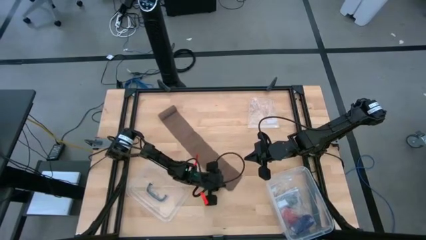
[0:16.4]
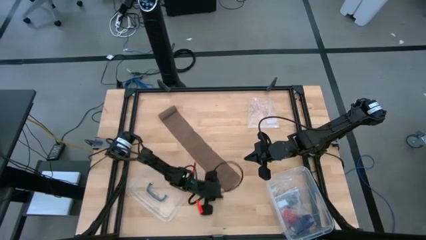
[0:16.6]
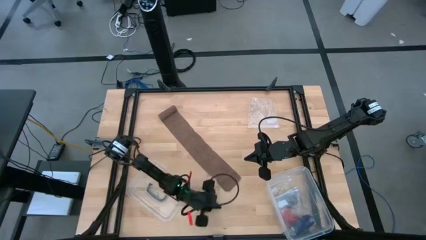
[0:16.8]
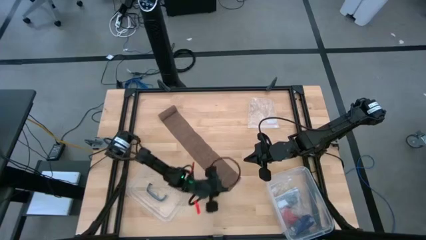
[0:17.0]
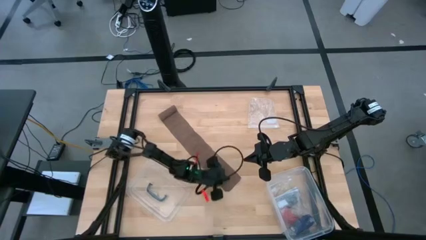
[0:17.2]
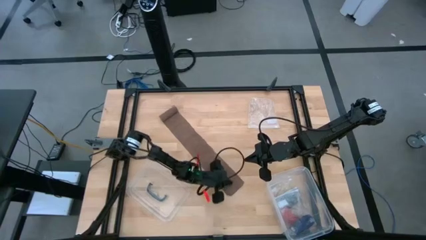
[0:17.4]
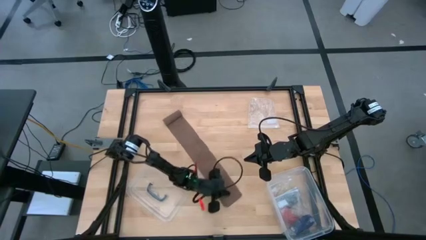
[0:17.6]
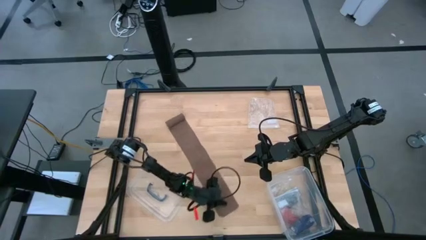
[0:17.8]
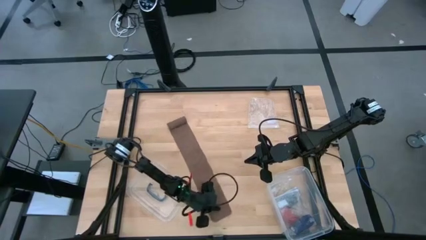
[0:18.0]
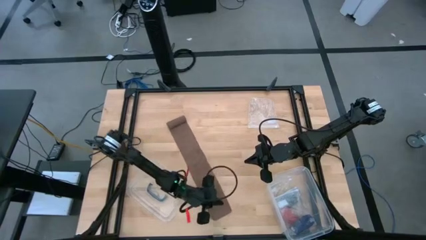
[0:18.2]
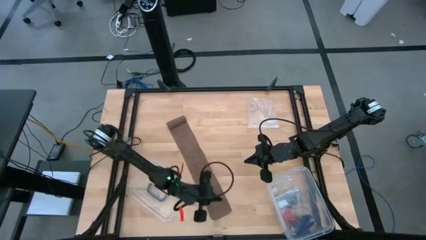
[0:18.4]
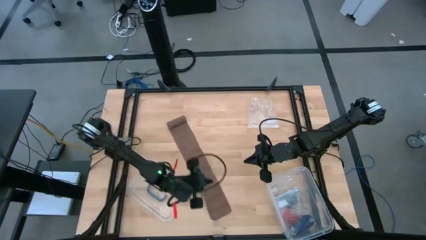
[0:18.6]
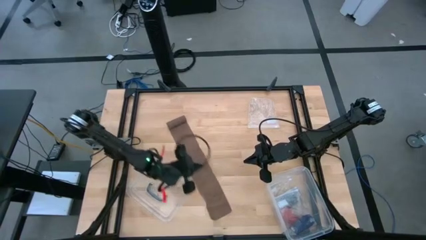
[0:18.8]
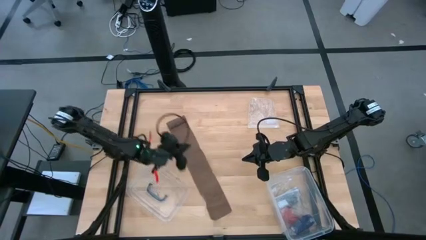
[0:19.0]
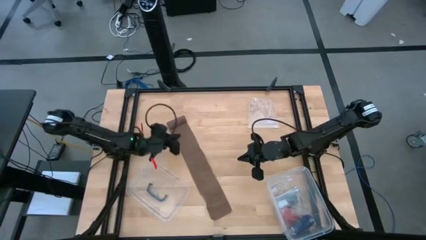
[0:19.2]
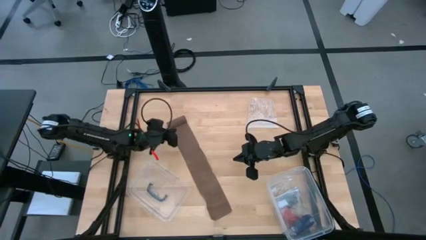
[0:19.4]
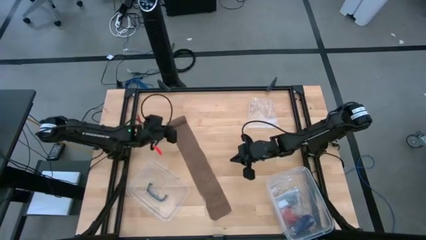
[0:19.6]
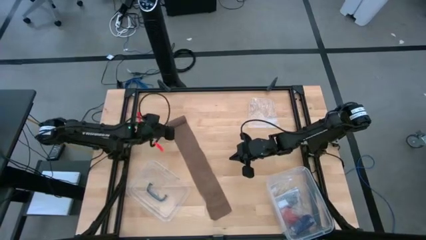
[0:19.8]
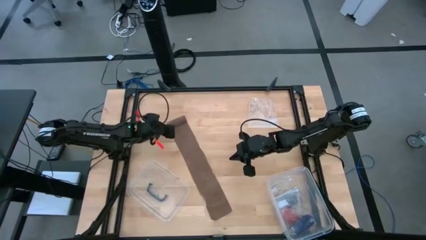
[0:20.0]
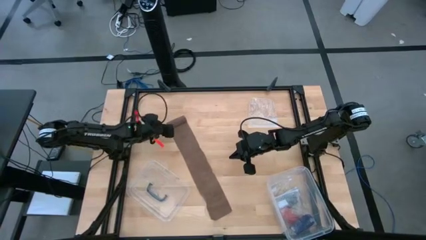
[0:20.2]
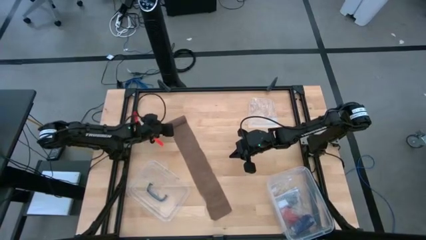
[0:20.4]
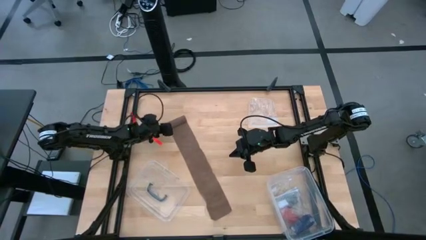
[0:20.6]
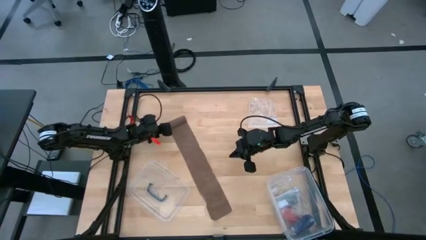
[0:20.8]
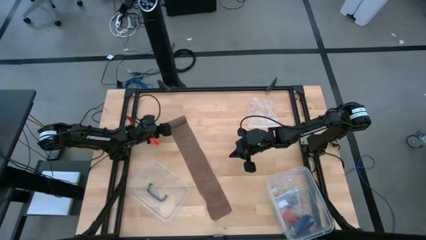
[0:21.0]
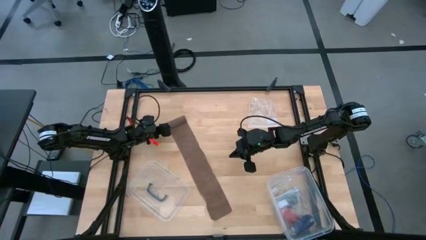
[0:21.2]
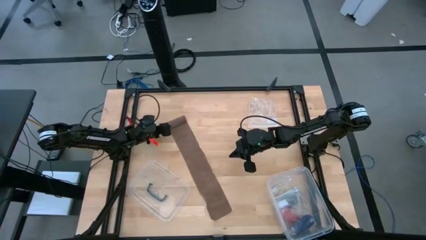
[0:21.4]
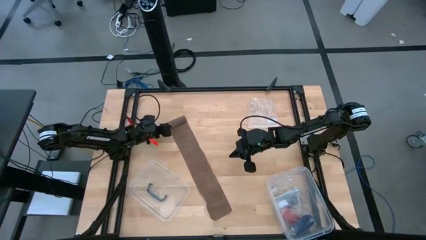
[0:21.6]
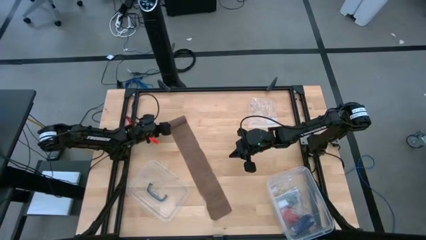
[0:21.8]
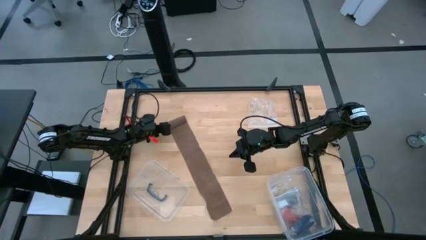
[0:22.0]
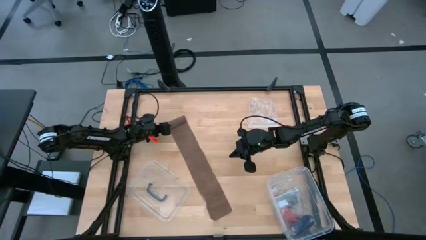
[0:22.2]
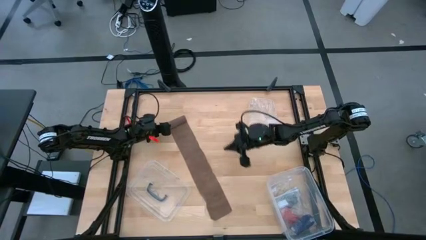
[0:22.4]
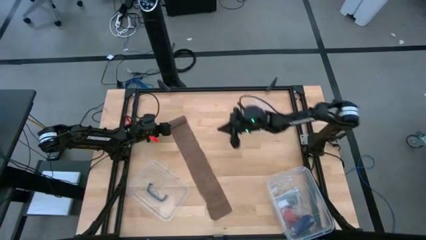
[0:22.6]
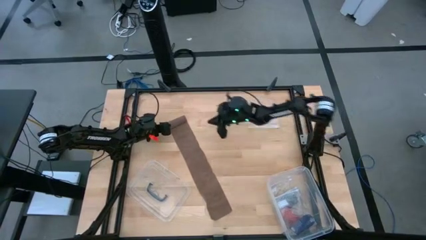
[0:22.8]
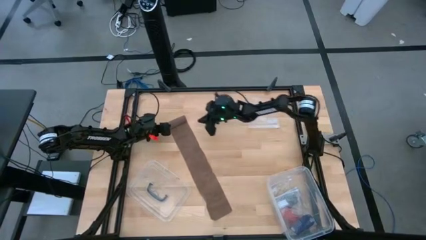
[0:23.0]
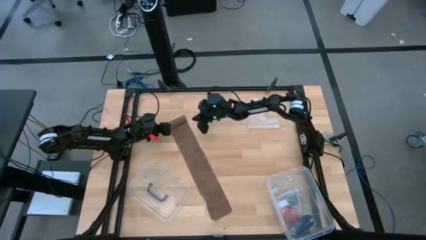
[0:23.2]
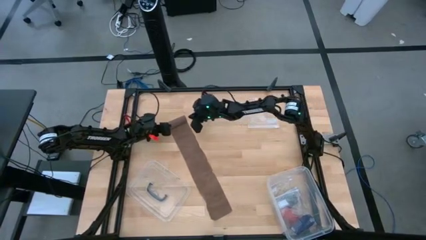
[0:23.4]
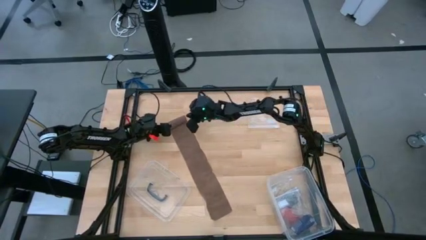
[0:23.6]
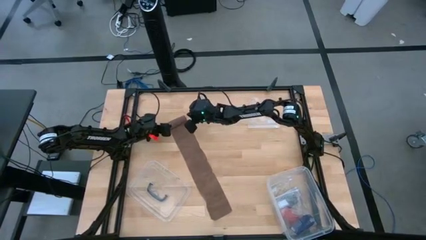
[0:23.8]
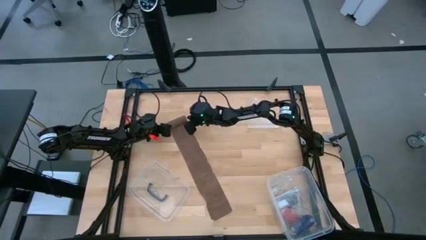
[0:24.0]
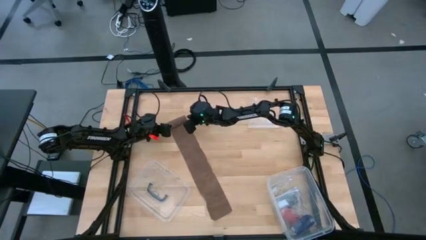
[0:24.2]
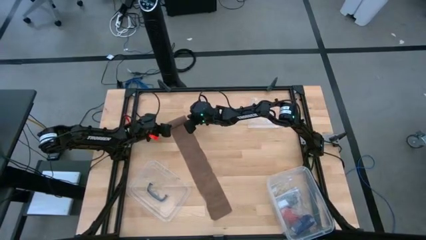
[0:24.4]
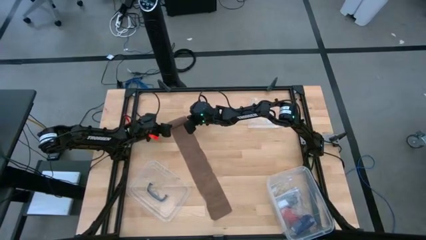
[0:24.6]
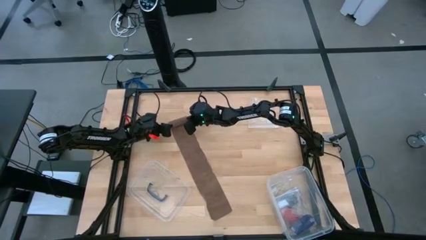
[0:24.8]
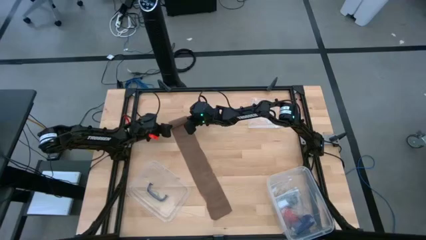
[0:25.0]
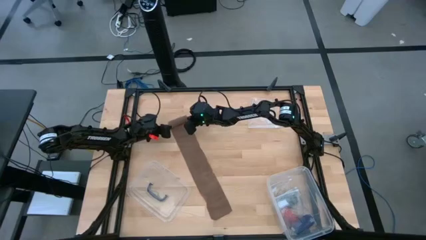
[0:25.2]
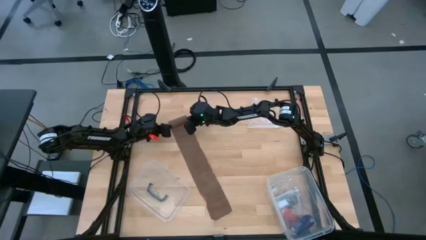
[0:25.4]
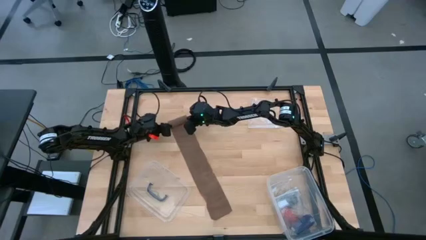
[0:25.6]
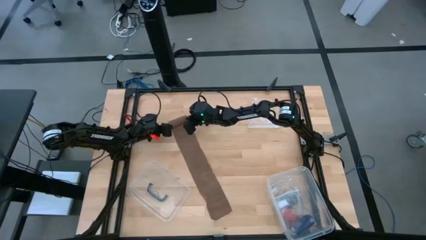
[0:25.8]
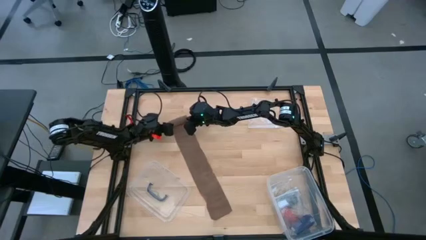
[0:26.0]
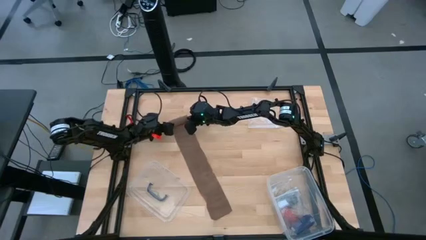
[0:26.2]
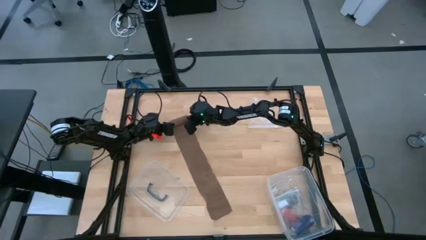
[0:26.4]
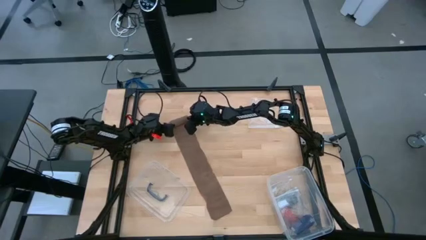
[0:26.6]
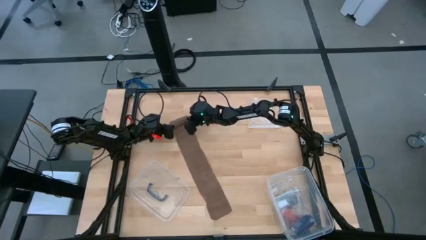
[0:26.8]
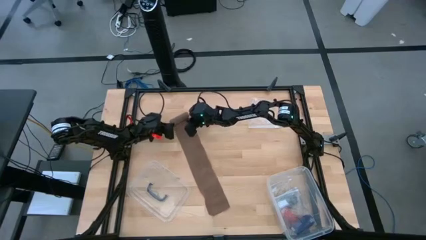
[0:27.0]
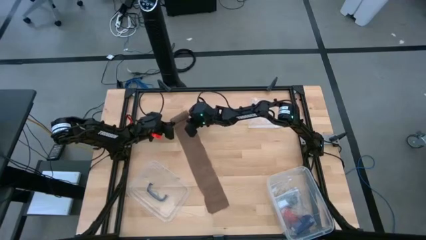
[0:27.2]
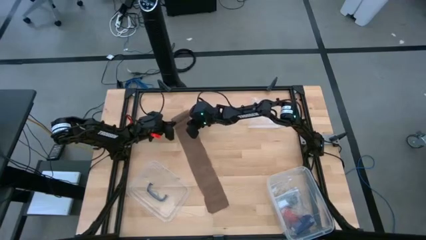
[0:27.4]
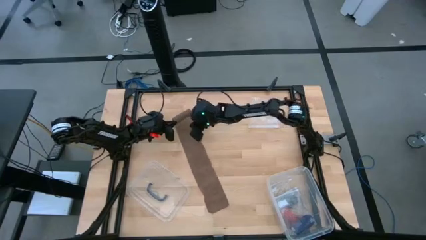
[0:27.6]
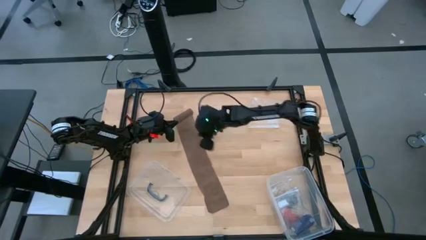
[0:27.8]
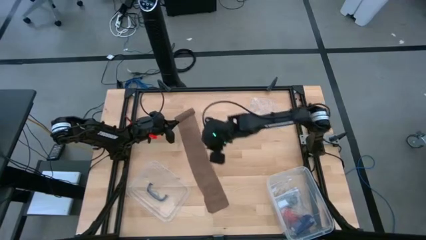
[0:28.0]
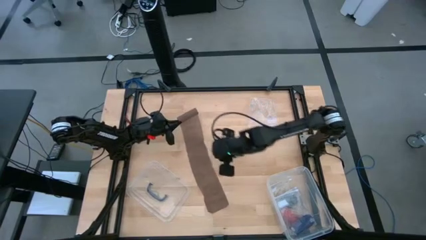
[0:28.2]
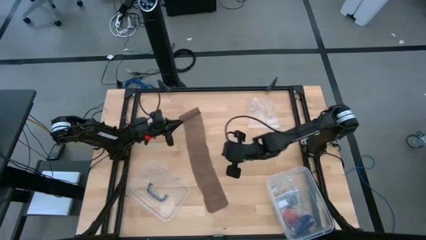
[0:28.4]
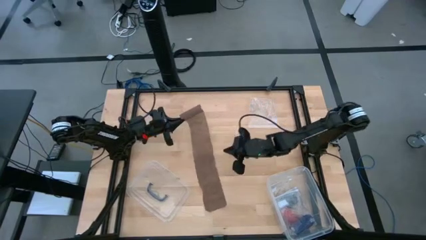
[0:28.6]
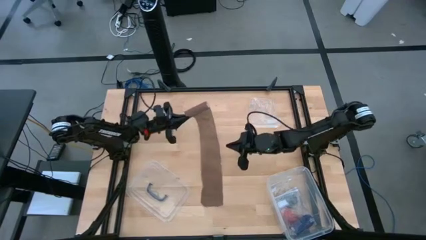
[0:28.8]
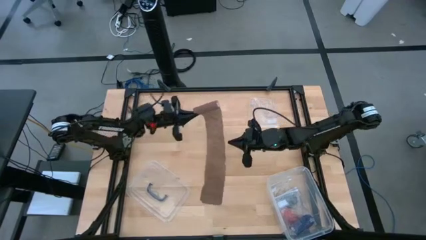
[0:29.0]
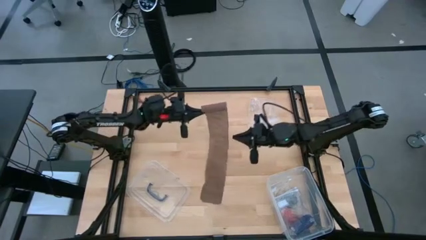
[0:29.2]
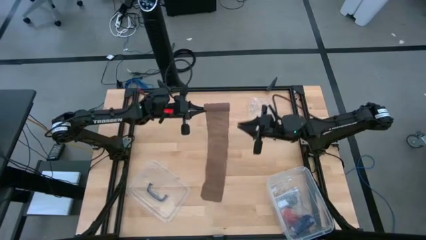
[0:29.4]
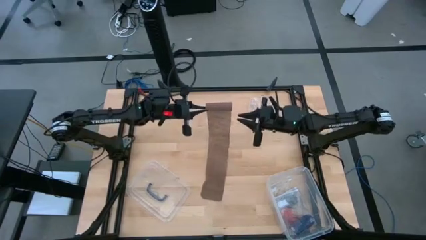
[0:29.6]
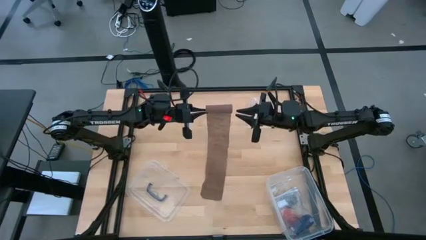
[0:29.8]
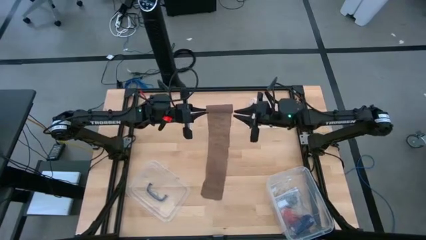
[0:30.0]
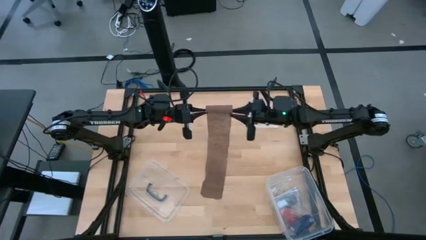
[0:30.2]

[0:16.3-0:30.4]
Task: Roll bandage
Roll the brown bandage

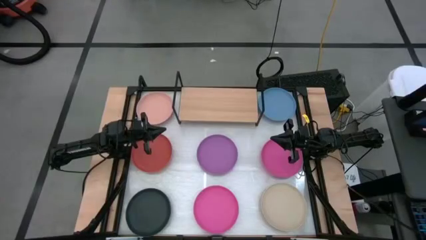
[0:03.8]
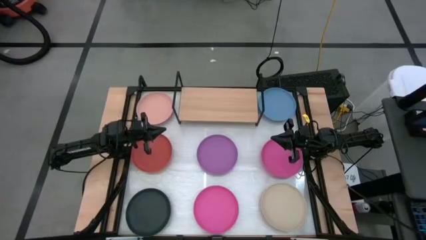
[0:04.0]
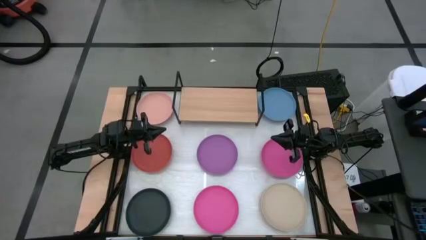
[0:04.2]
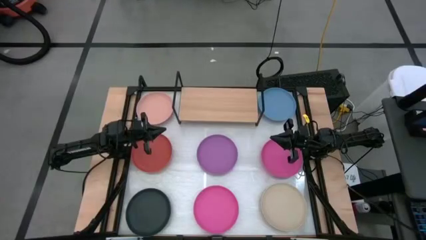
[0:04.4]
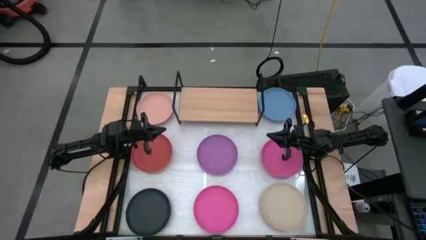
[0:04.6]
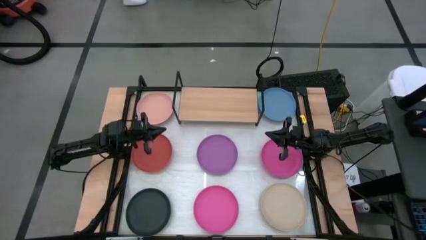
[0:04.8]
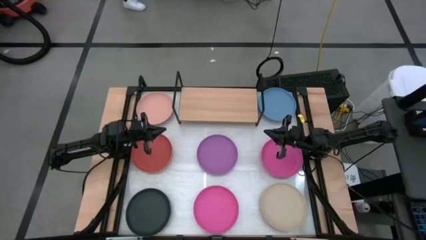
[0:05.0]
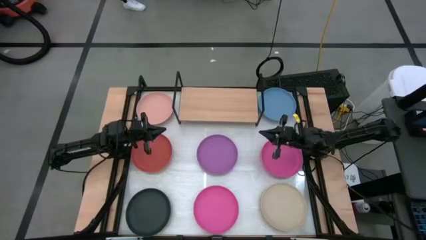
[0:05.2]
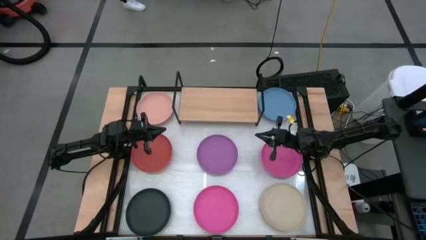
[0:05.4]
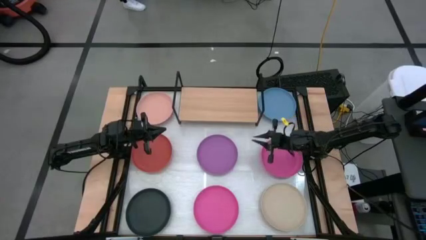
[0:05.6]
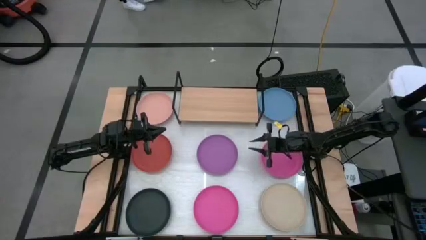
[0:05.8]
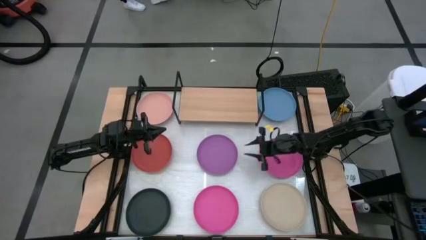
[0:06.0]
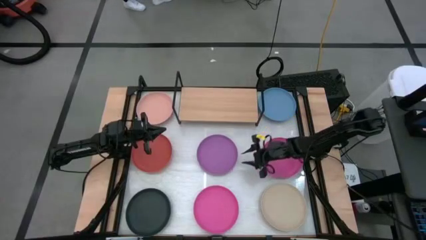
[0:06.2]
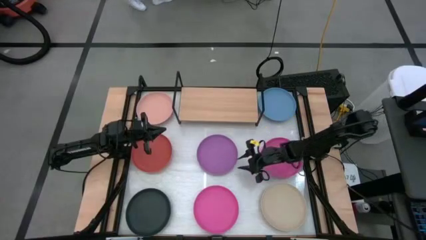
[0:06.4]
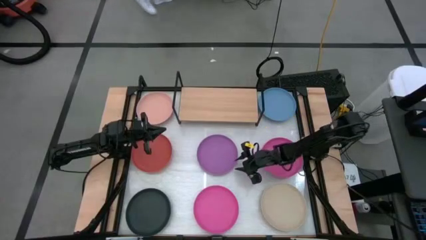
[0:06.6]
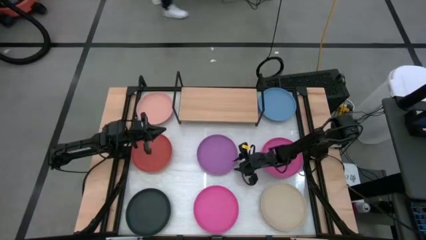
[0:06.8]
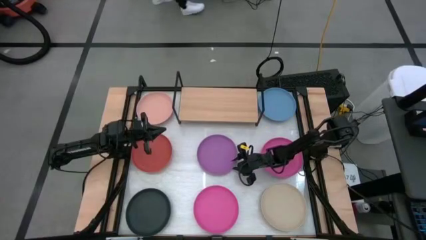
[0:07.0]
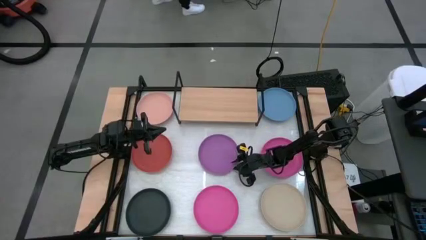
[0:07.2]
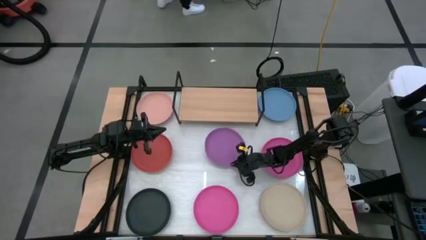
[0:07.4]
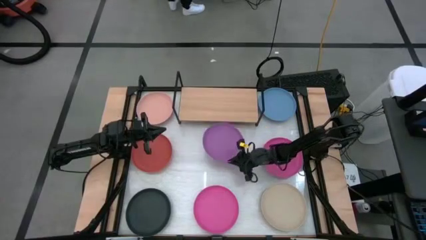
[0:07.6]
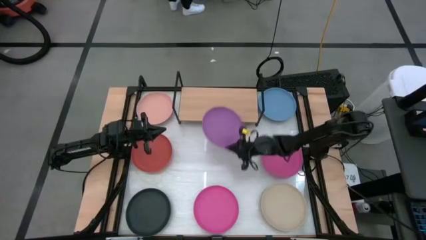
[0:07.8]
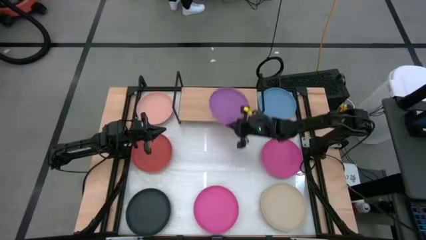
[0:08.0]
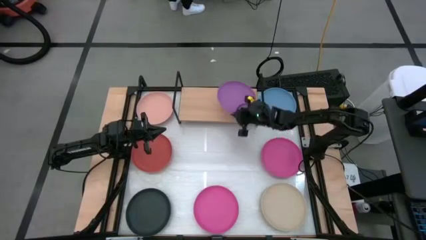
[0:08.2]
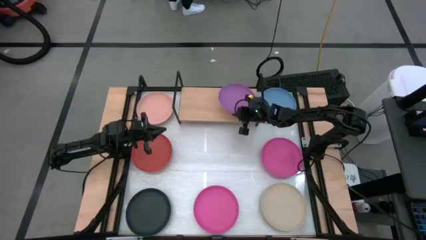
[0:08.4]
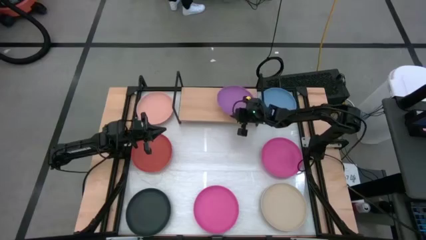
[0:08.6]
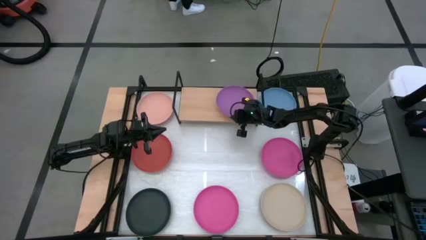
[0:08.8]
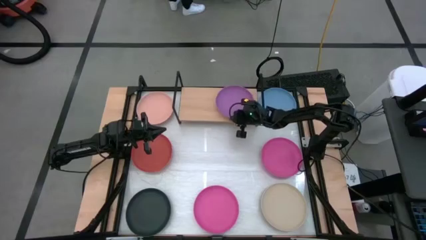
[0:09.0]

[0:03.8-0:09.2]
Task: Place and stack plates onto a shelf
Put the violet plate on the shelf
